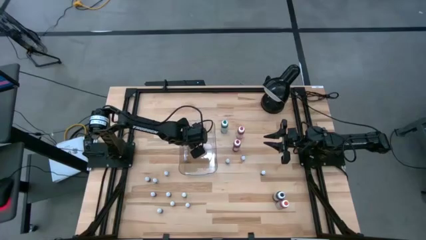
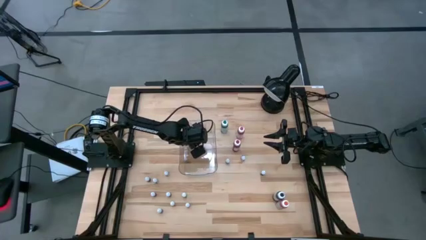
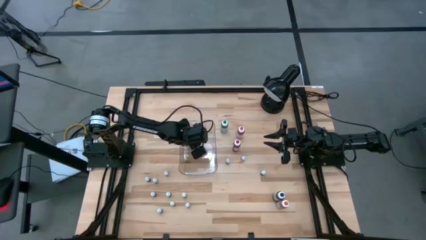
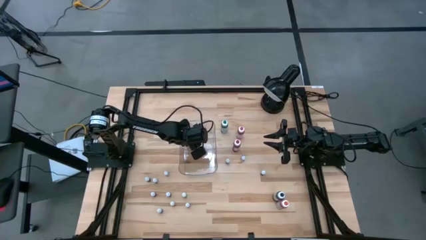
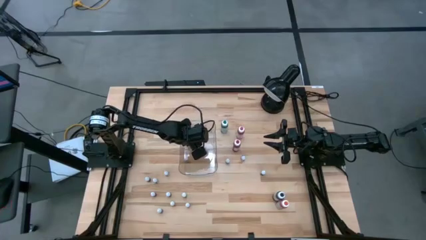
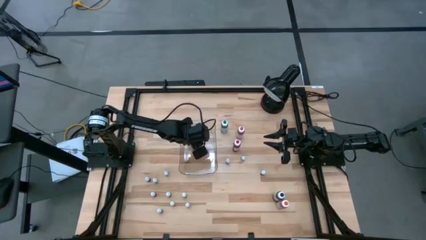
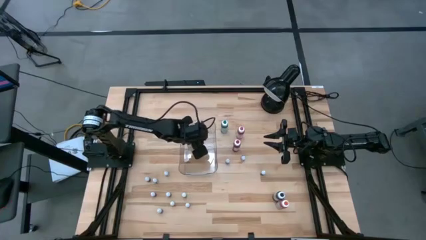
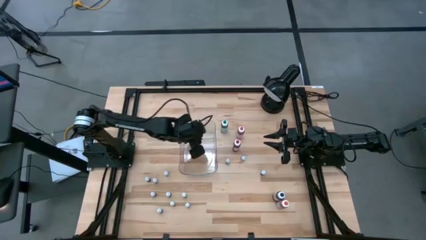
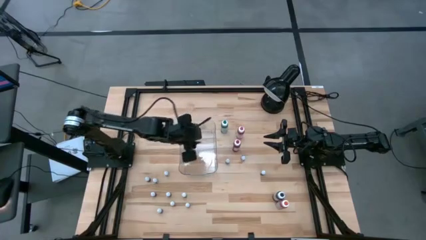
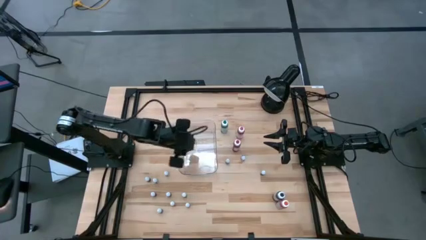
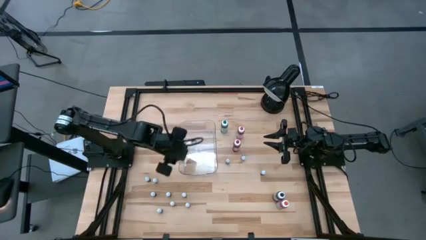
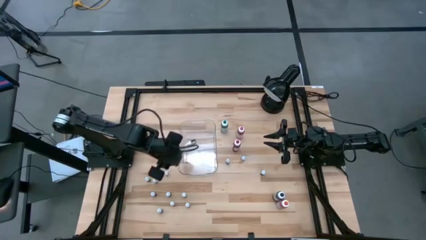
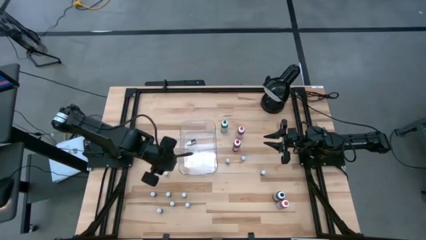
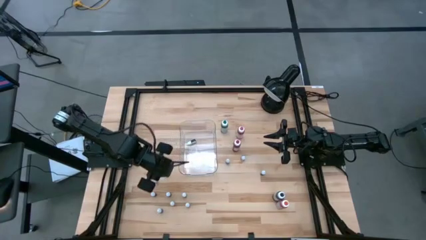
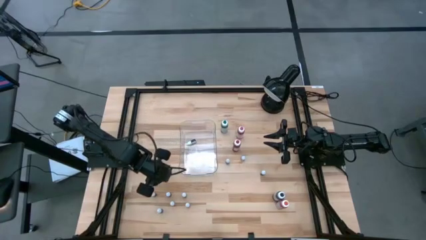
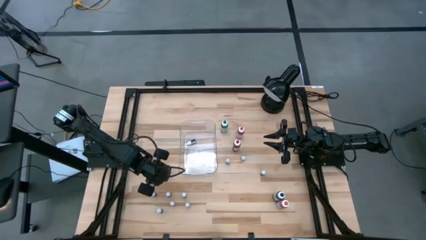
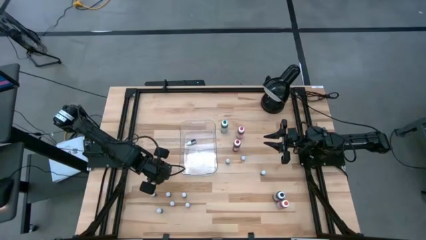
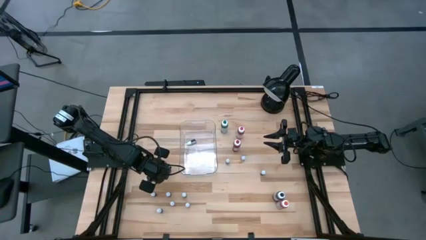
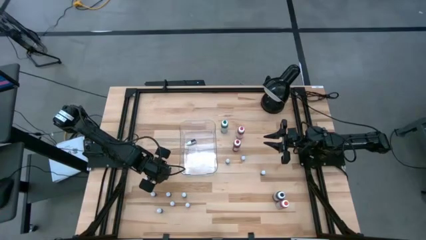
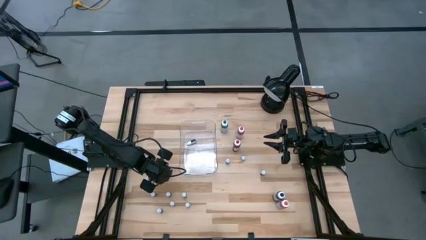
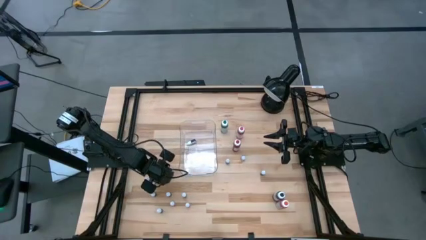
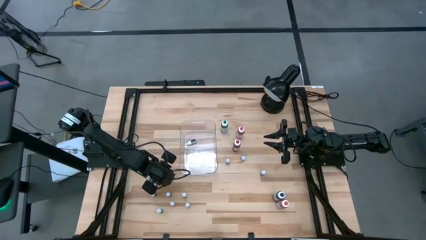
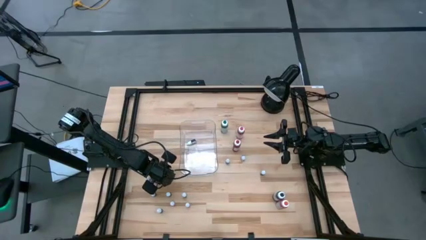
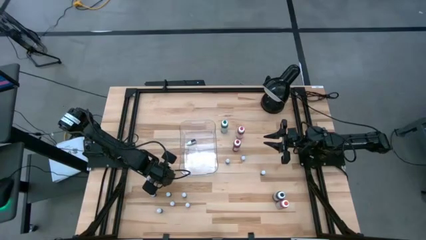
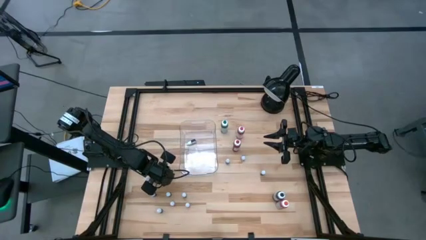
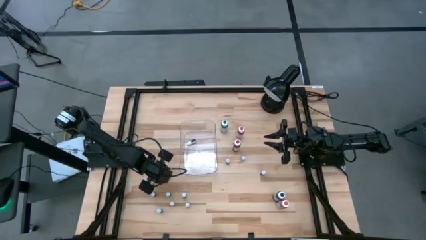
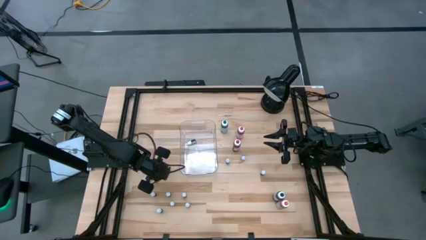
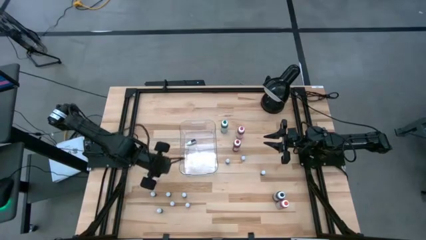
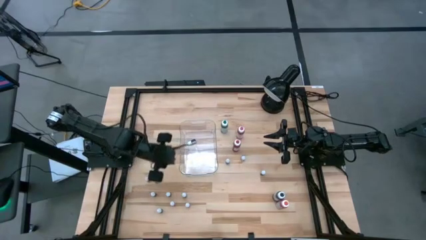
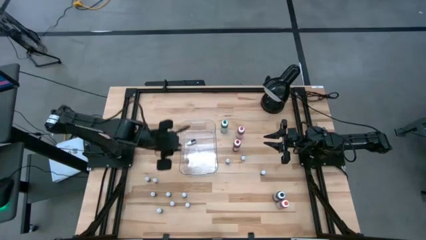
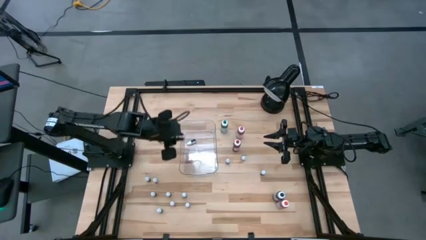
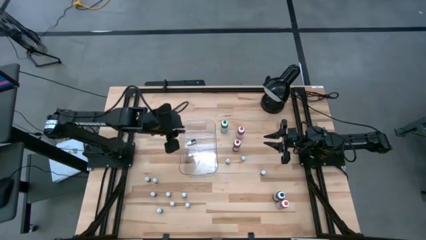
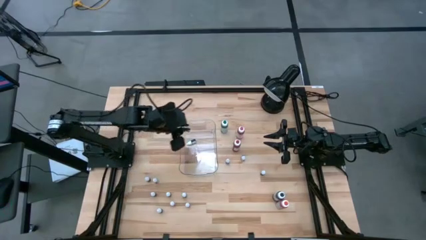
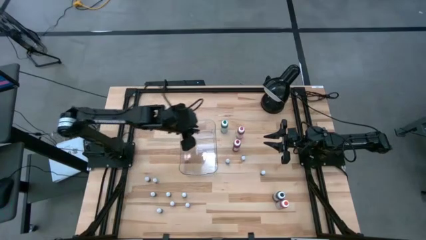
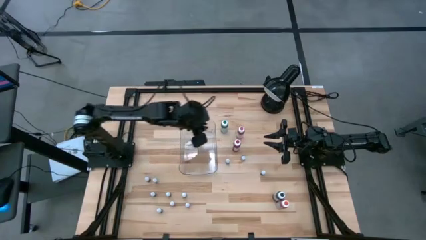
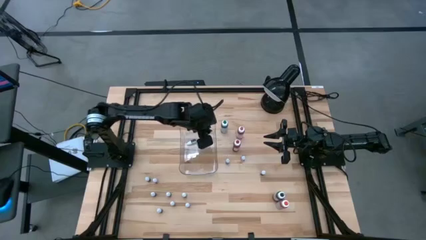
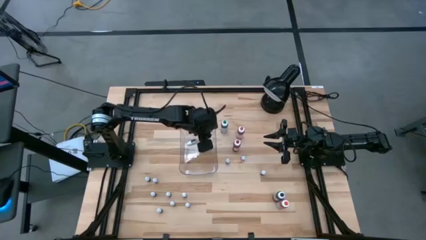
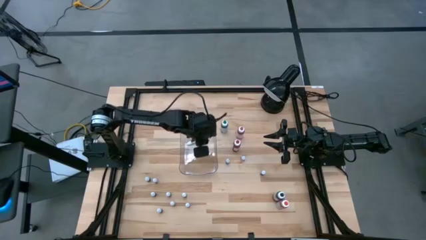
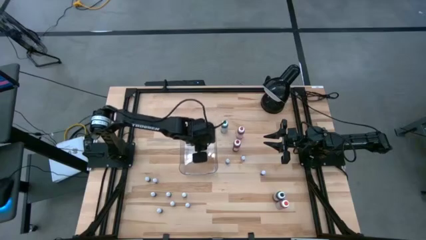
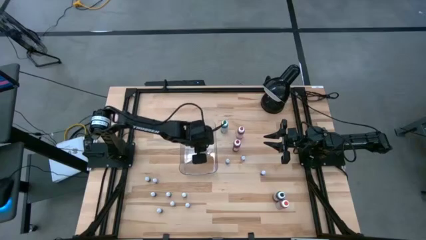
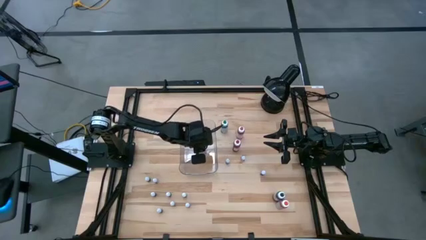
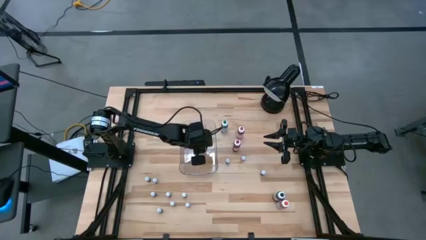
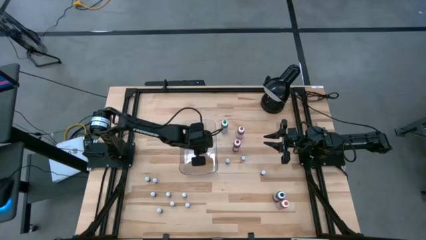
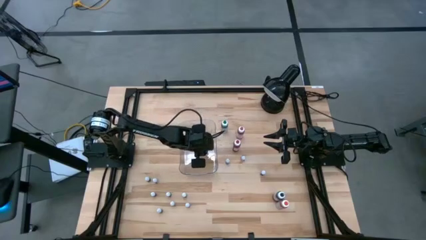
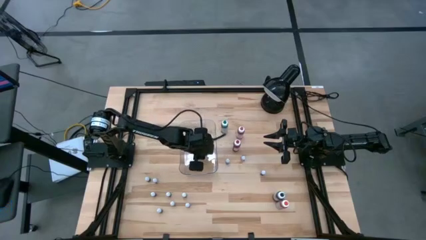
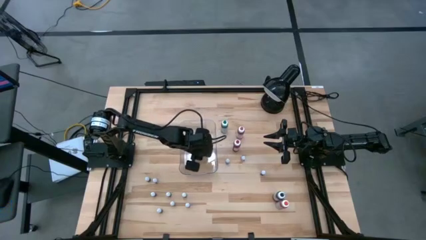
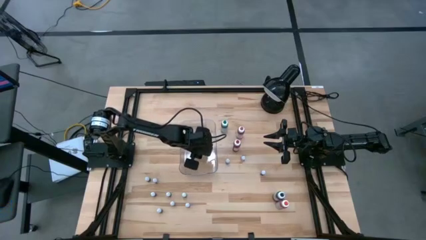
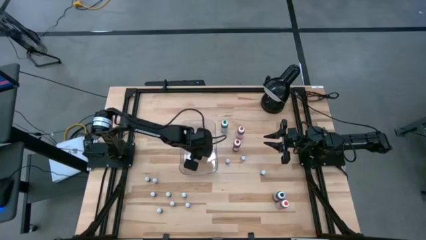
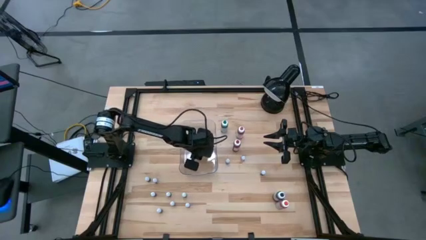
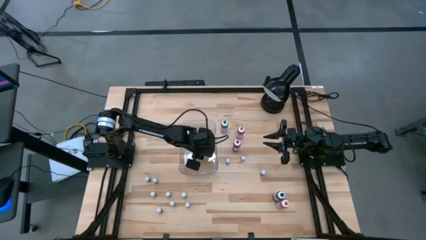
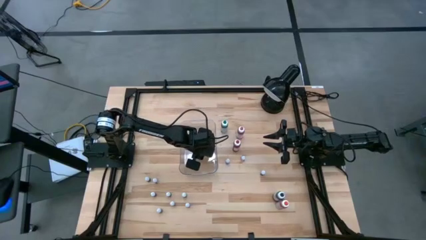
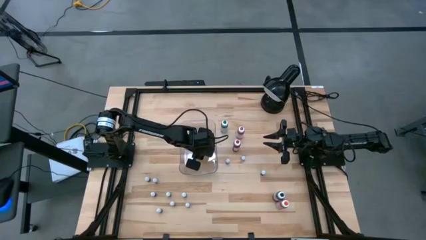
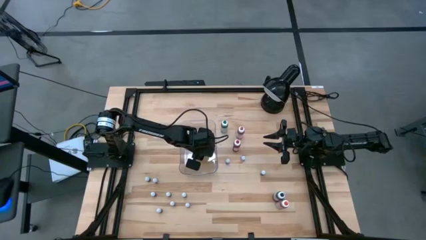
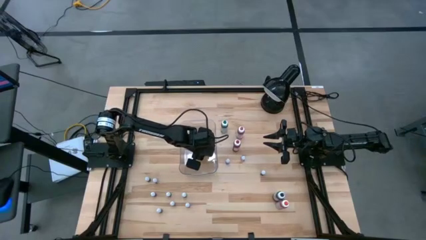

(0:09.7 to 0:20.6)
Task: Pick & Place food coloring
Put the top small green food coloring bottle into the transparent bin

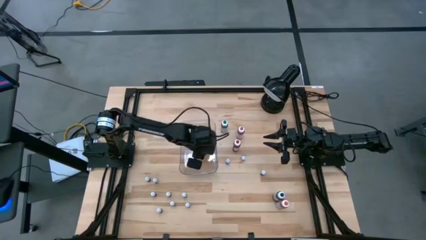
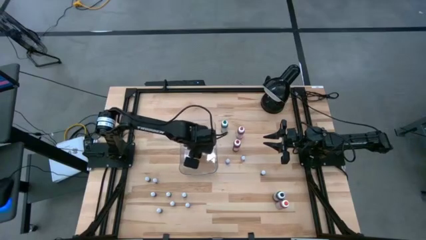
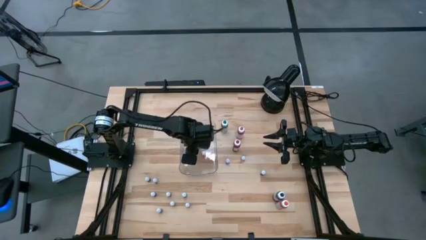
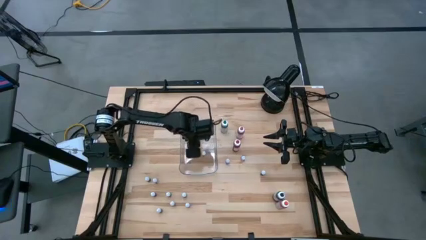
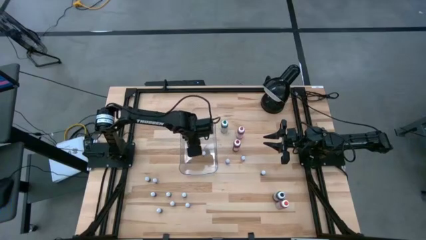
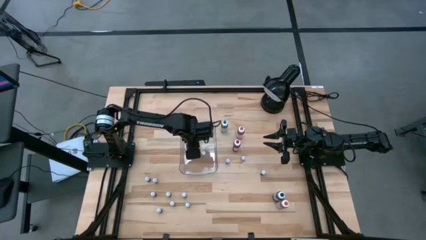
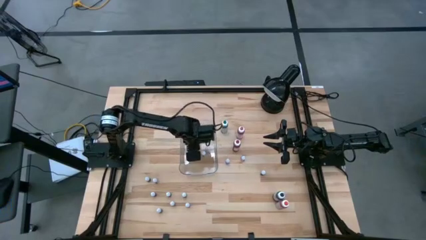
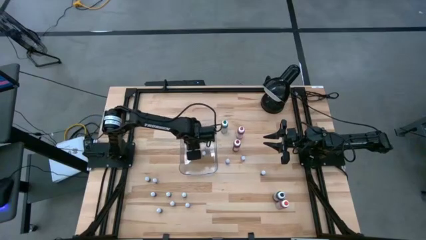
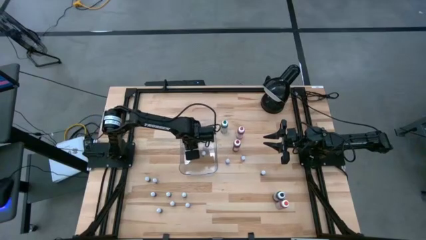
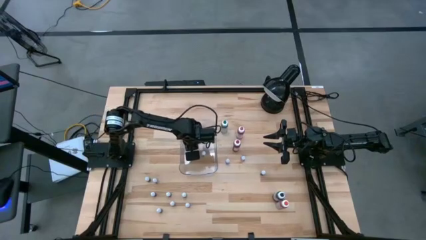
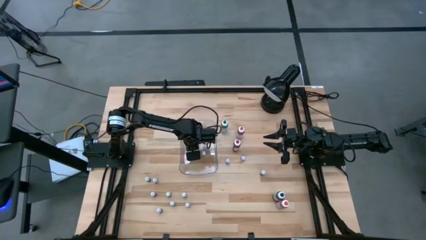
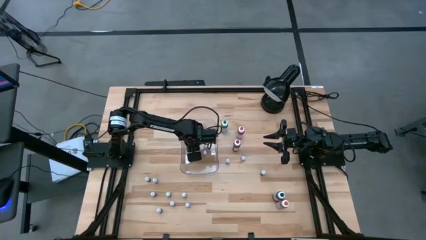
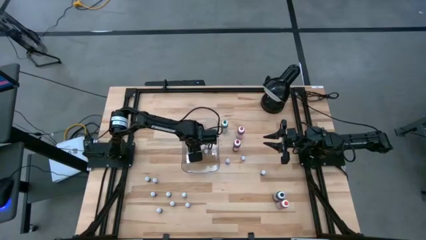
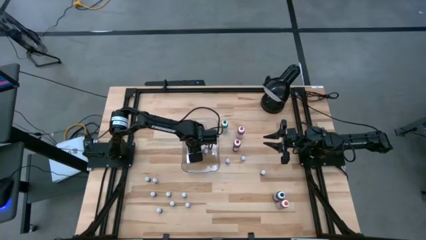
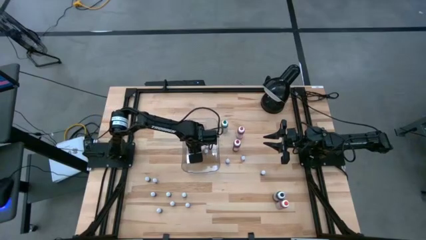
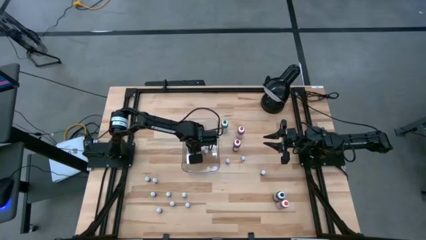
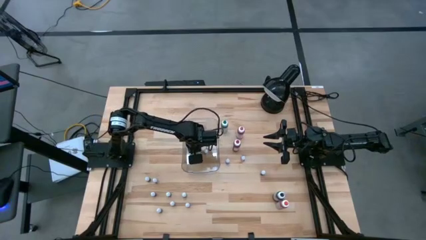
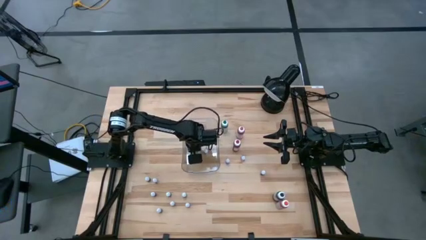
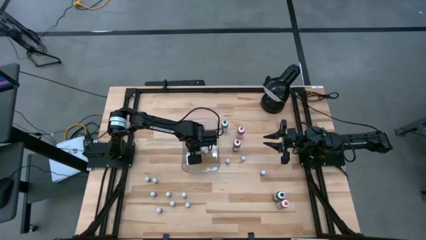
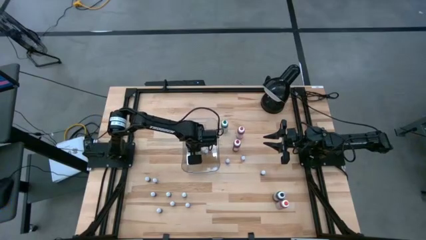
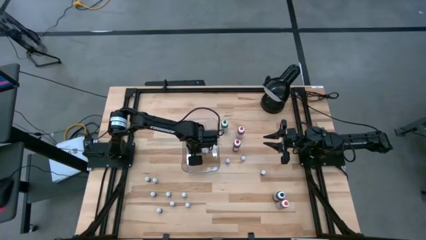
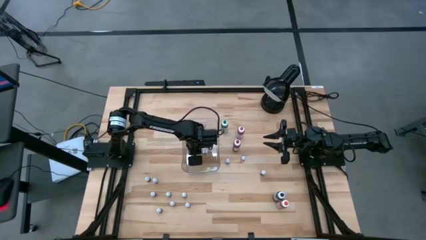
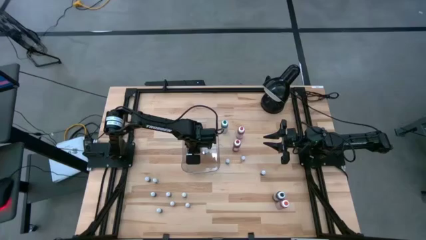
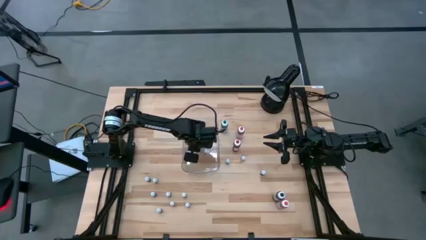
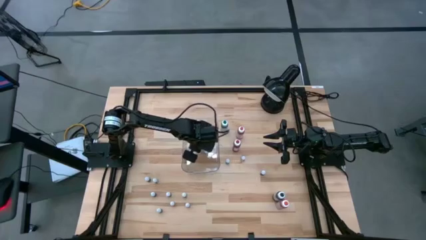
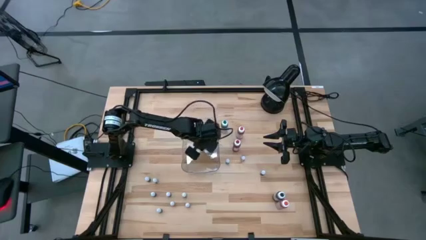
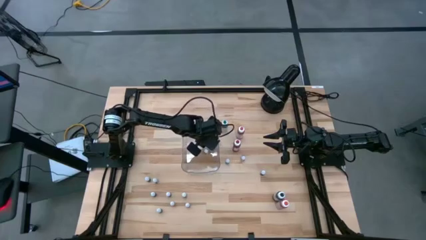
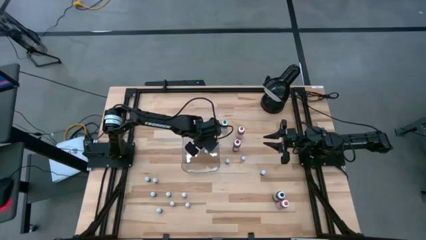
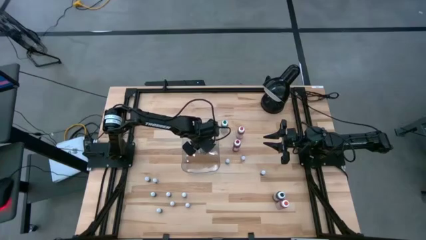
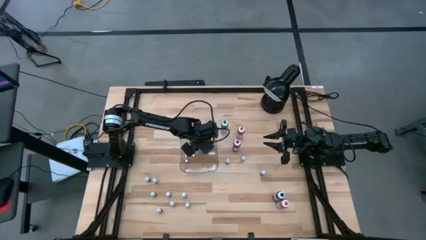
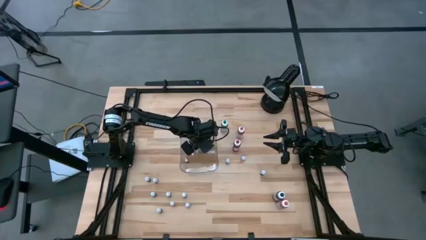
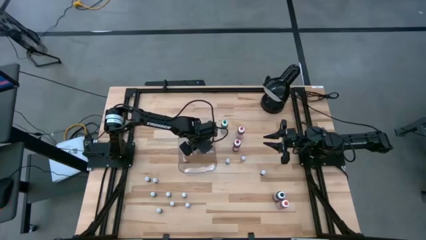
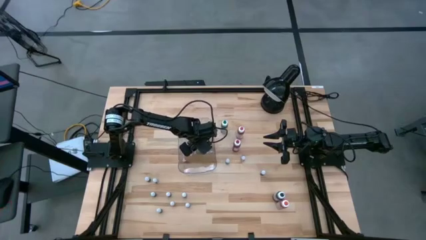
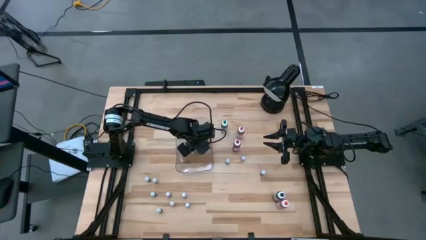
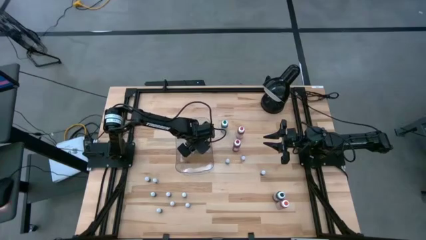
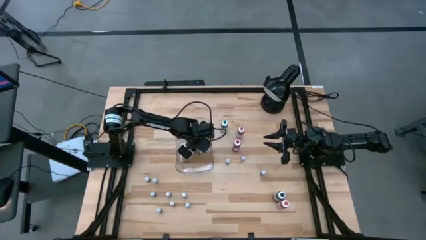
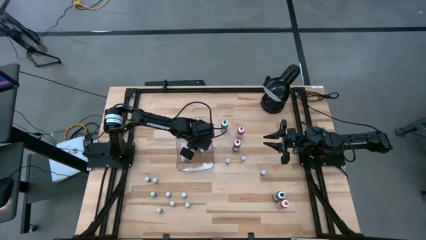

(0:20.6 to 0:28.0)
Adjust the small black food coloring bottle in the bin
